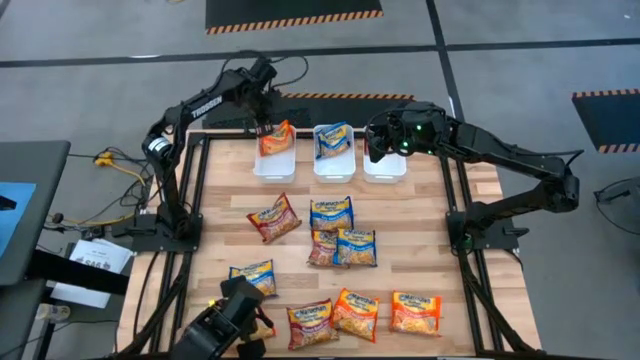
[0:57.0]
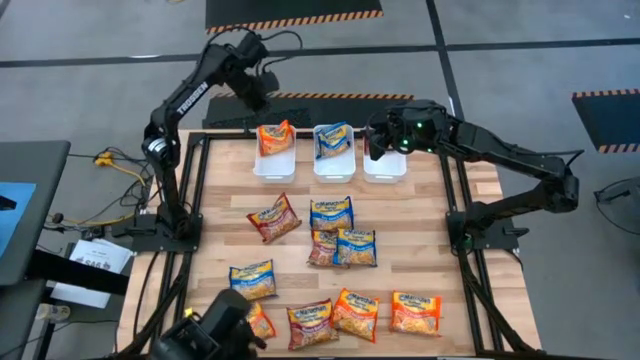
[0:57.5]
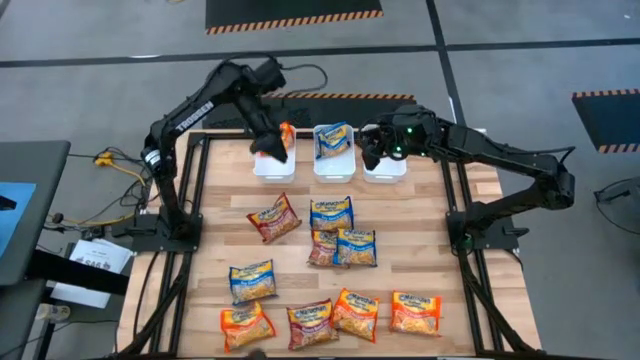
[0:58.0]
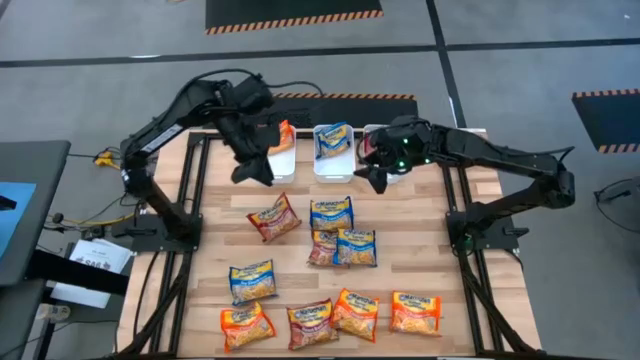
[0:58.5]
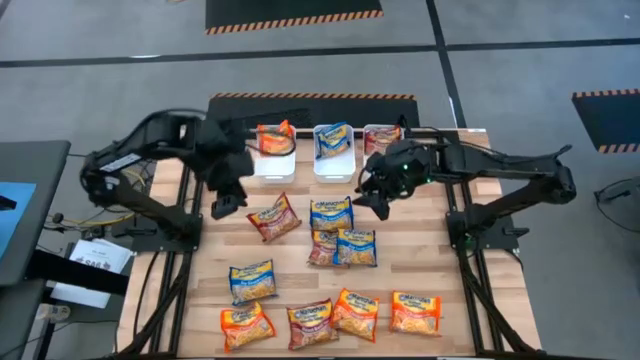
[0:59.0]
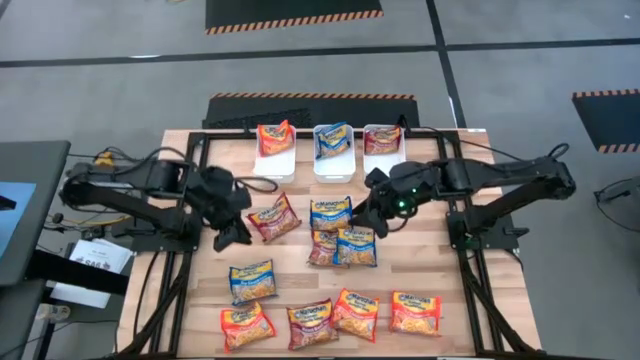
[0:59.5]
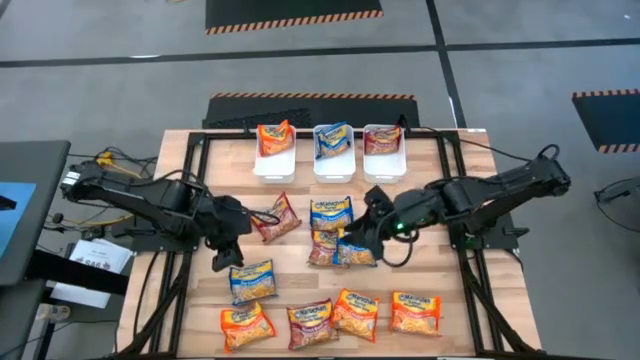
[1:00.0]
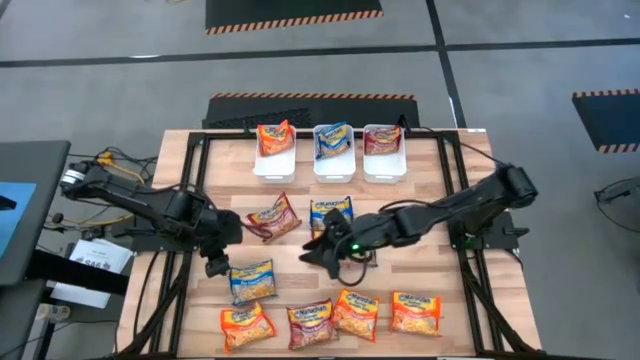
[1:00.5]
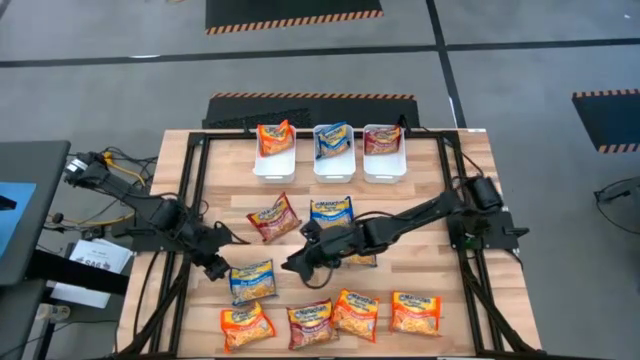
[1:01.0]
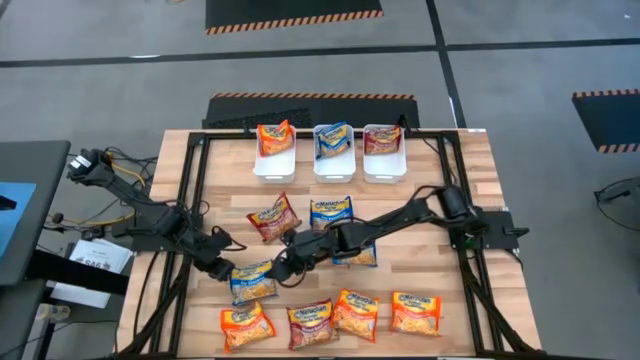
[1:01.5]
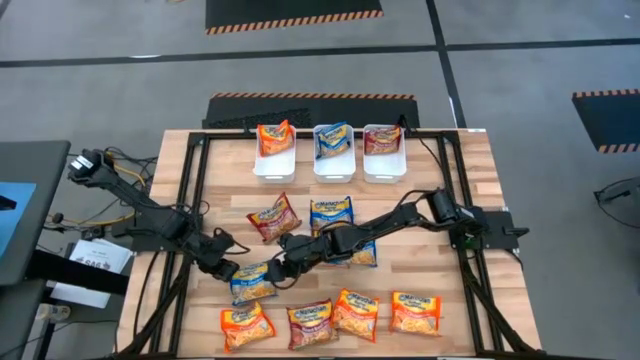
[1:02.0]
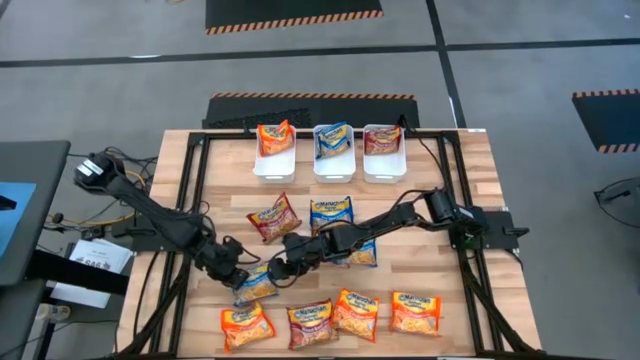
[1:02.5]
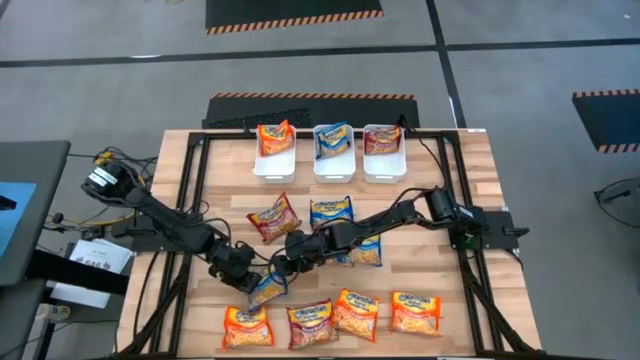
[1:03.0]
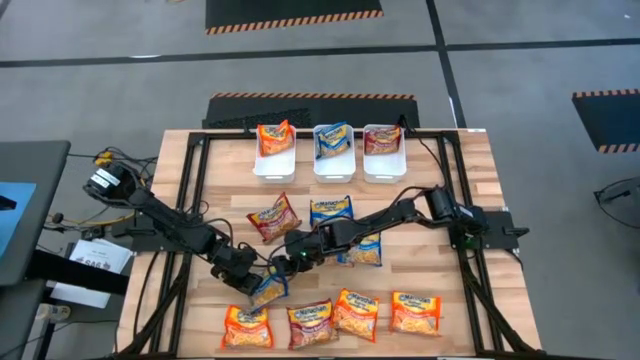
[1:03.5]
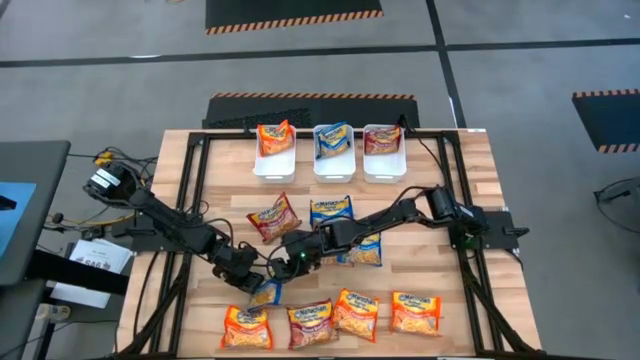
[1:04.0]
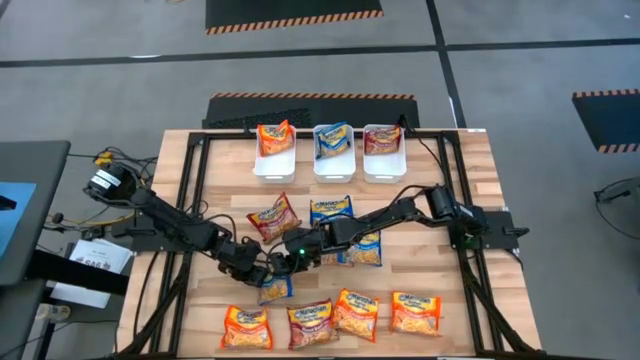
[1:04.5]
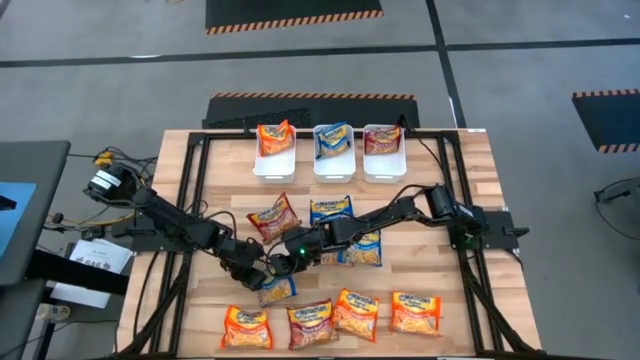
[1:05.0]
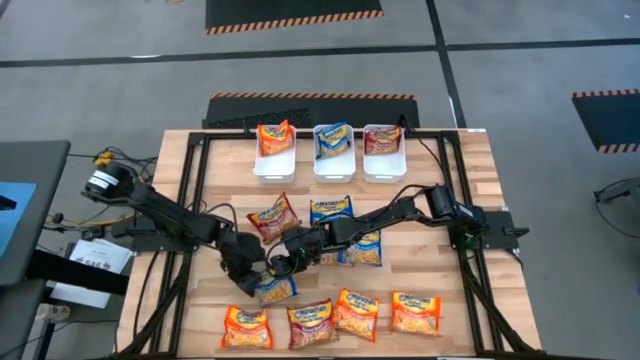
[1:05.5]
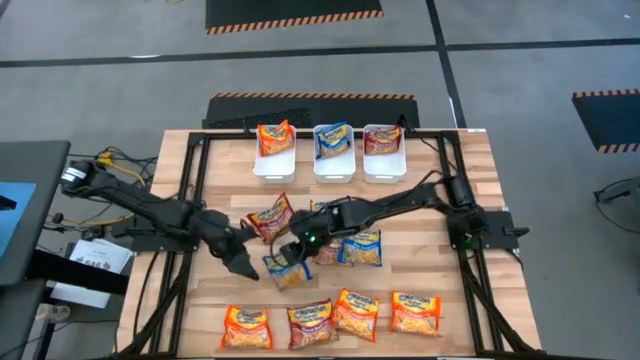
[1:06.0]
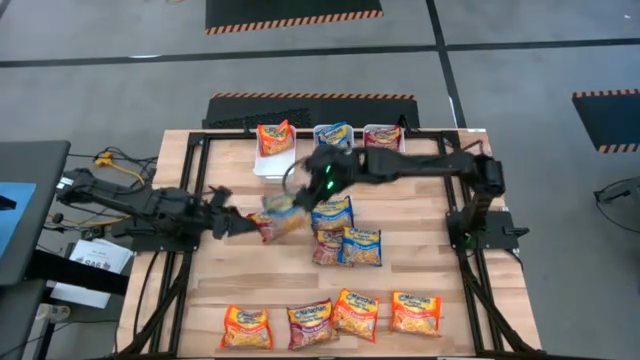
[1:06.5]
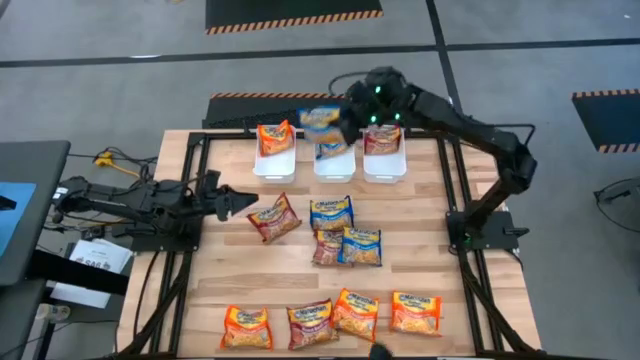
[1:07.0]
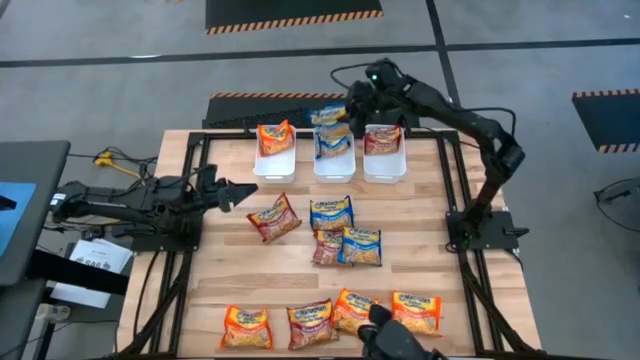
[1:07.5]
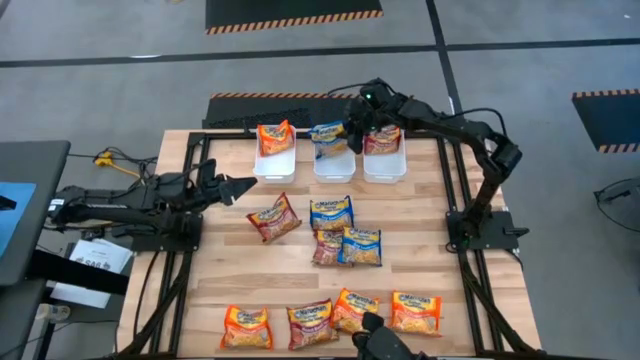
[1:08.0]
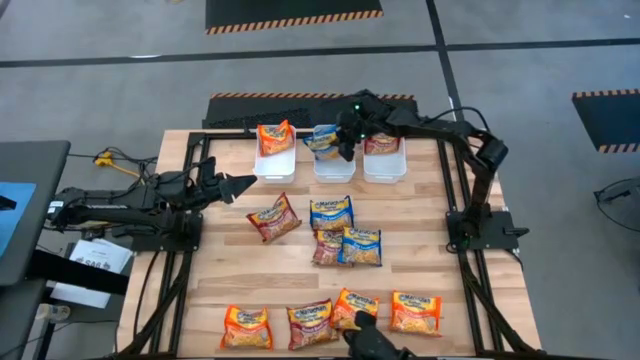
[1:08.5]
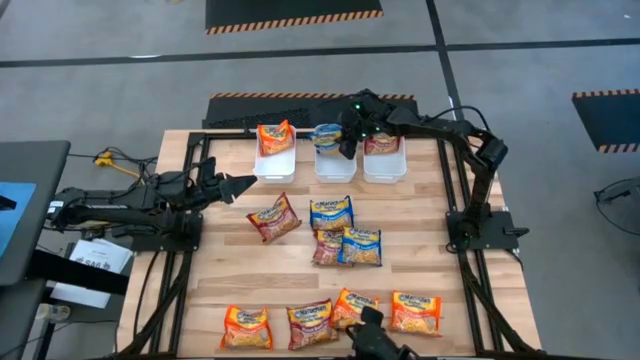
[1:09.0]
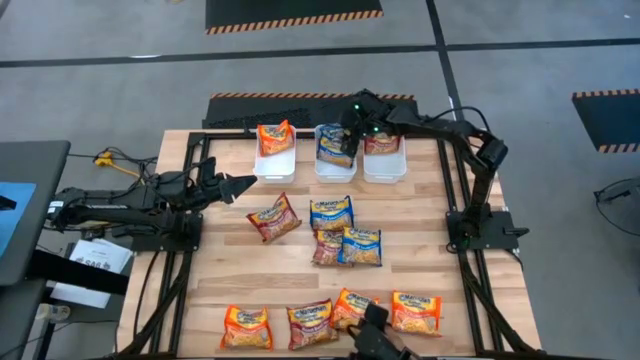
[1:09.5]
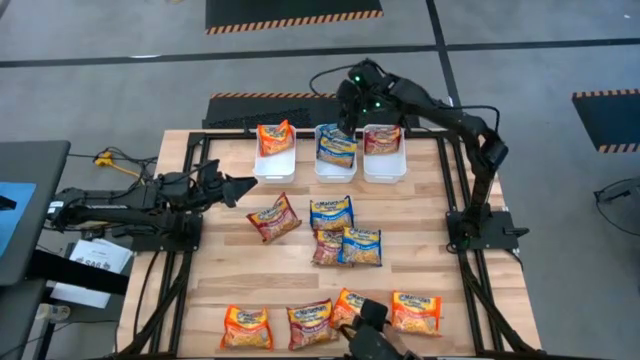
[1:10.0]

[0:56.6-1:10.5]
Task: Sort Maruchan noodles
Put the left blue noodle soup pack into the middle white bin
